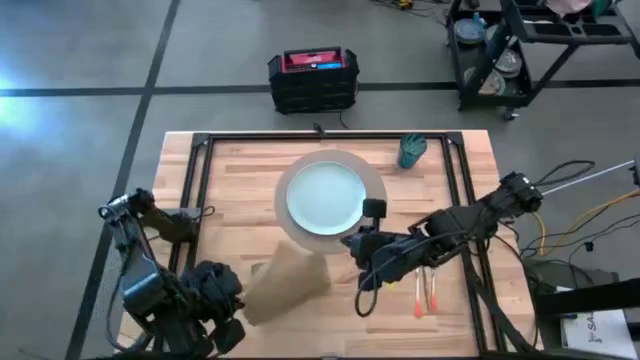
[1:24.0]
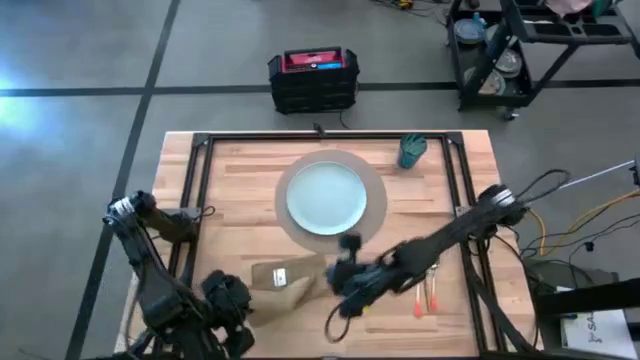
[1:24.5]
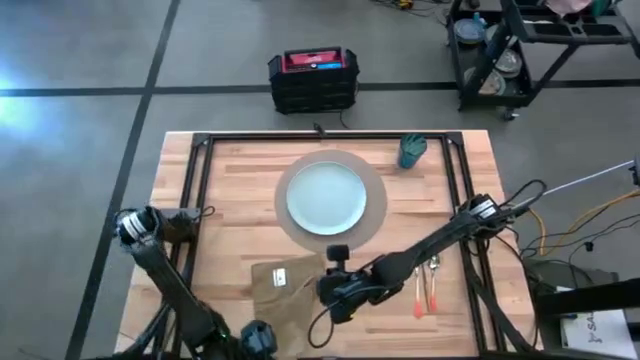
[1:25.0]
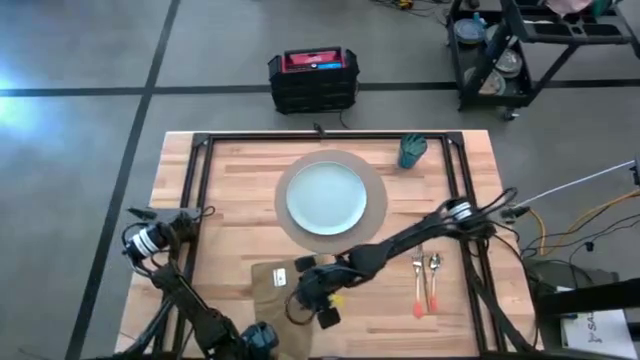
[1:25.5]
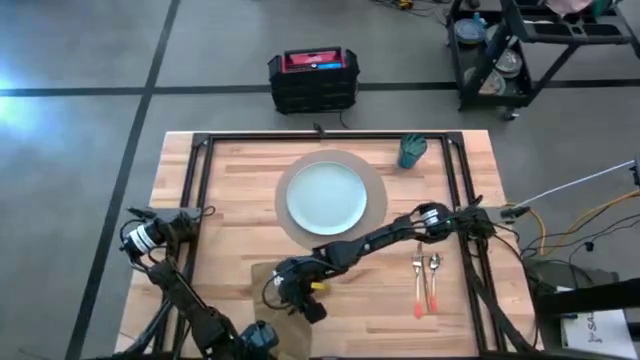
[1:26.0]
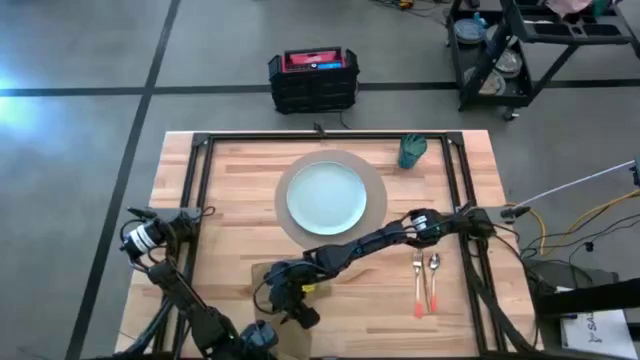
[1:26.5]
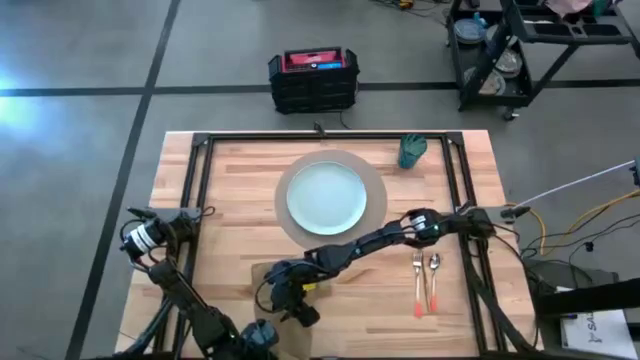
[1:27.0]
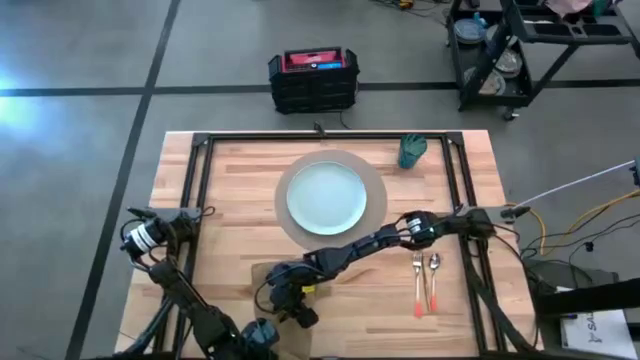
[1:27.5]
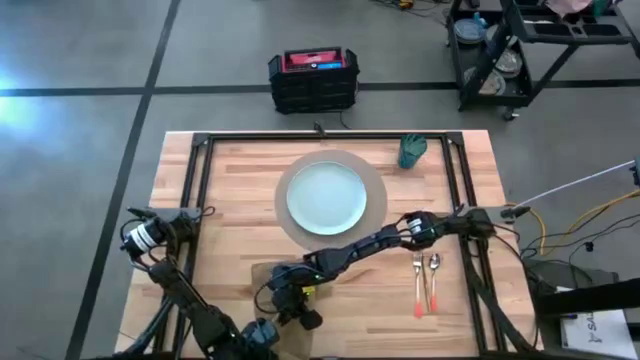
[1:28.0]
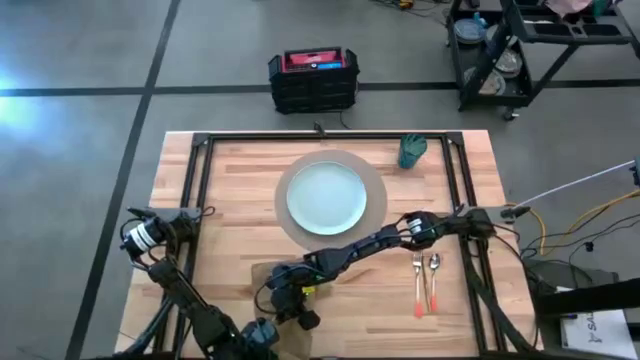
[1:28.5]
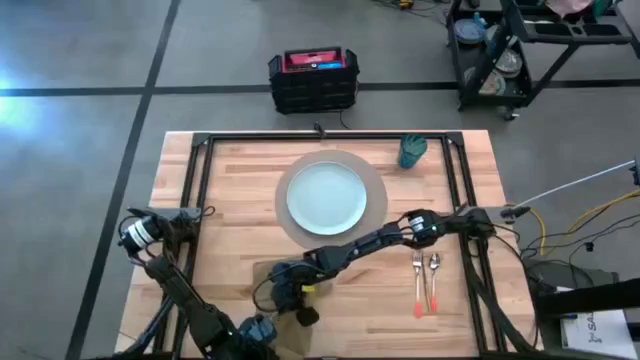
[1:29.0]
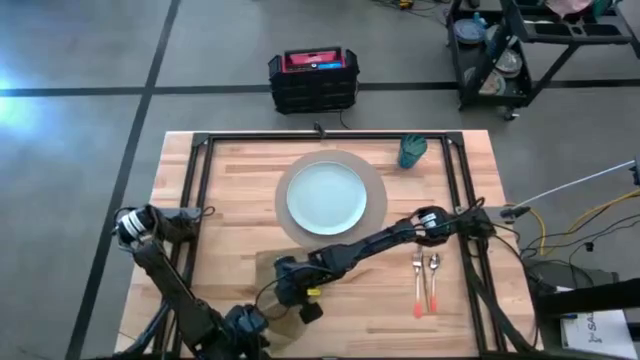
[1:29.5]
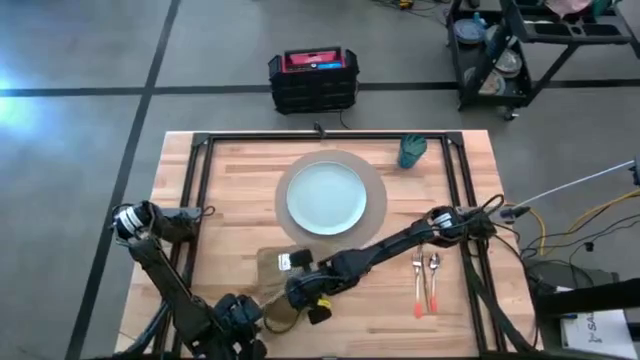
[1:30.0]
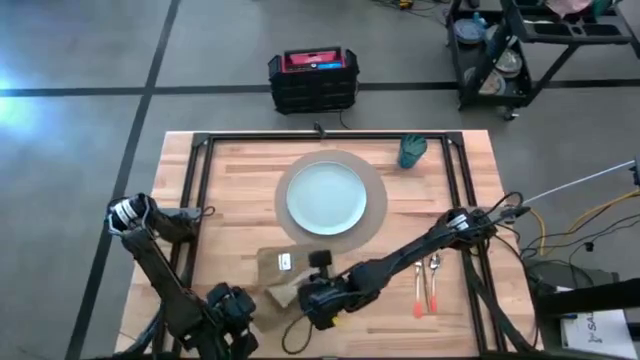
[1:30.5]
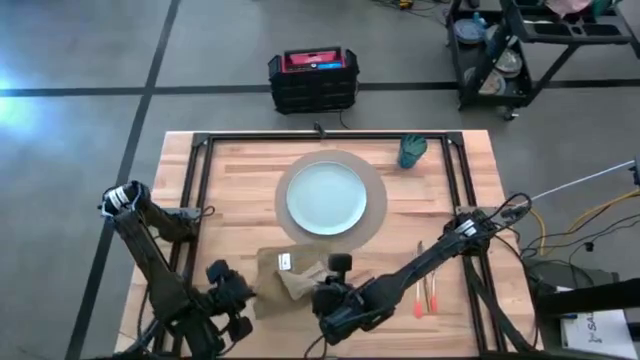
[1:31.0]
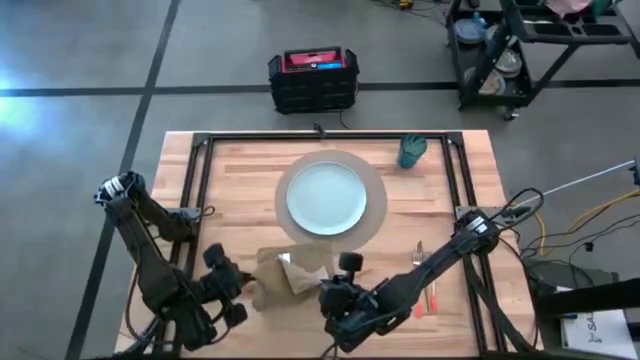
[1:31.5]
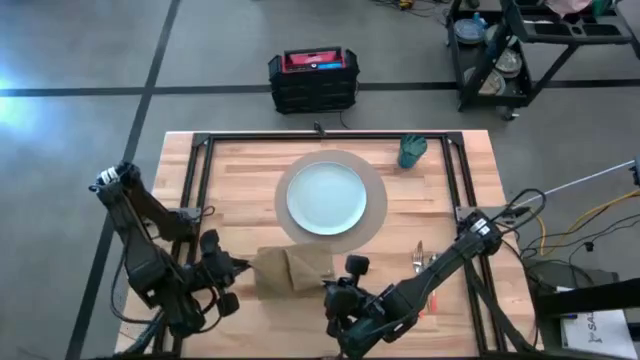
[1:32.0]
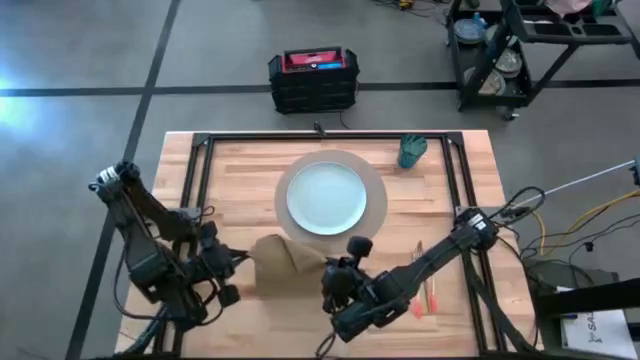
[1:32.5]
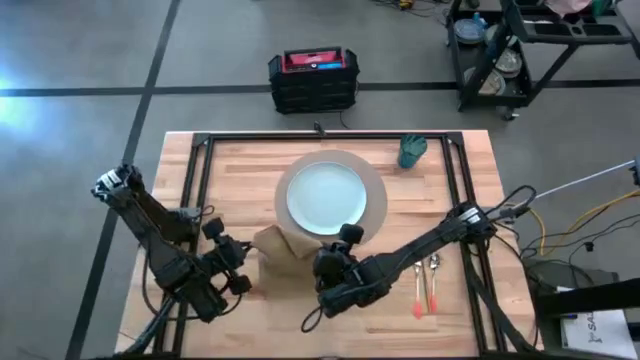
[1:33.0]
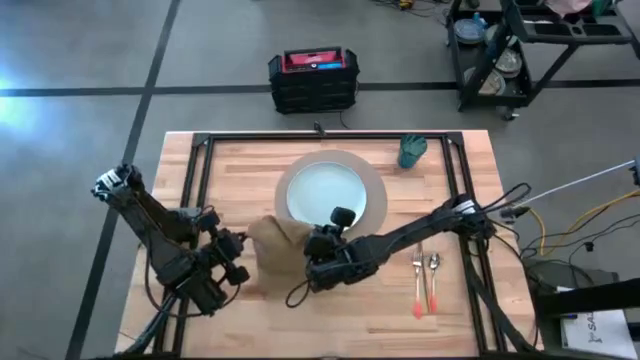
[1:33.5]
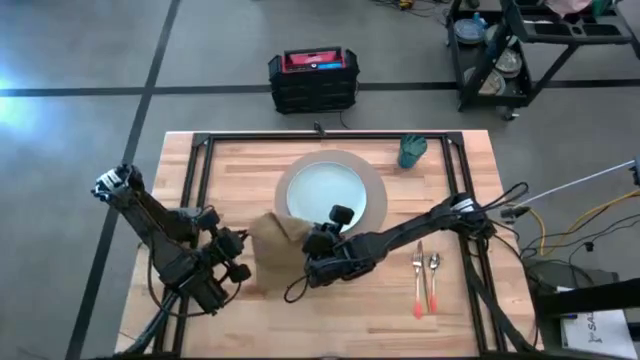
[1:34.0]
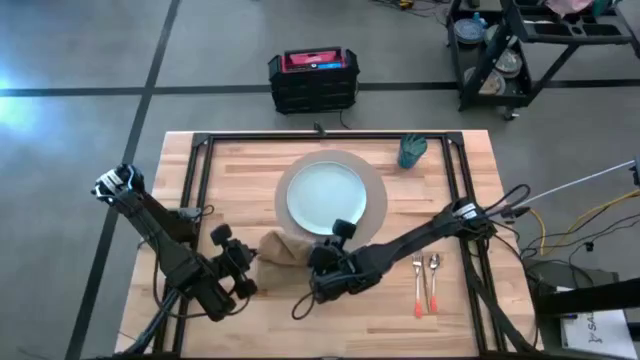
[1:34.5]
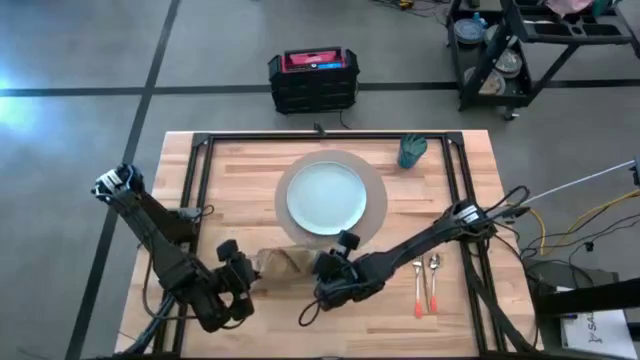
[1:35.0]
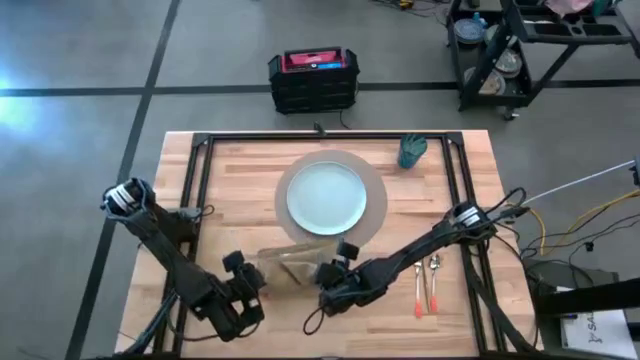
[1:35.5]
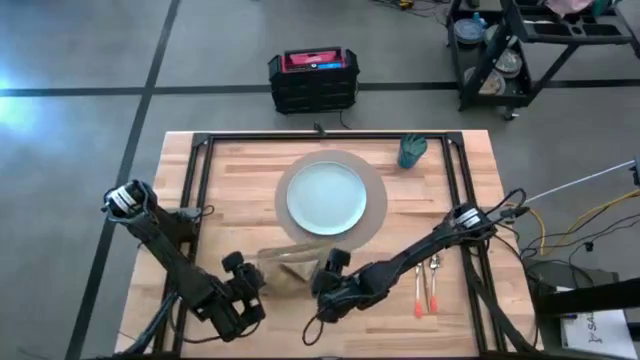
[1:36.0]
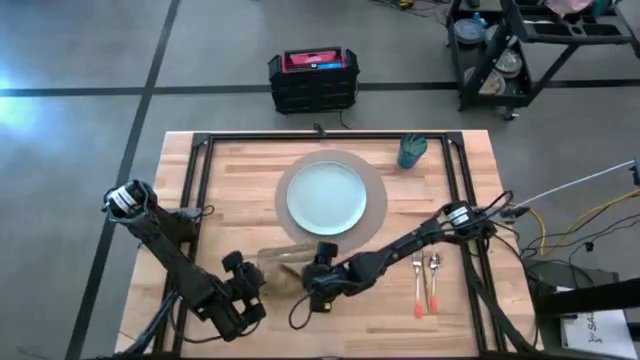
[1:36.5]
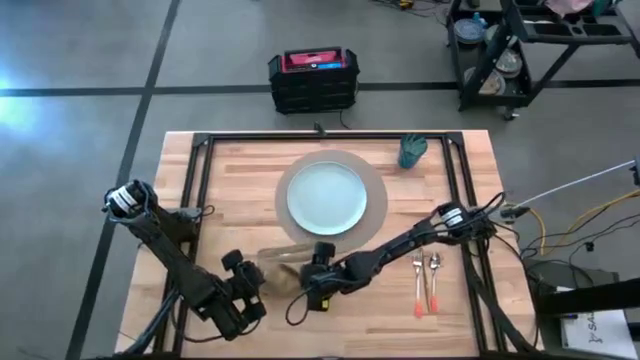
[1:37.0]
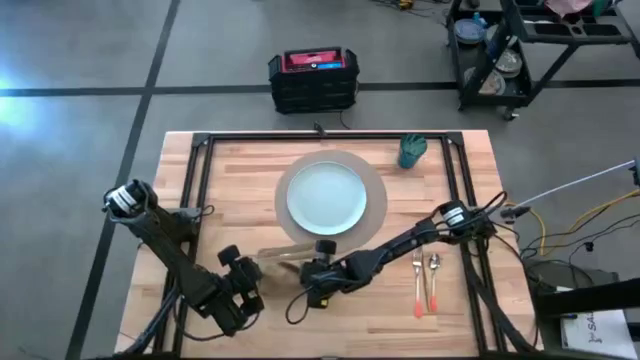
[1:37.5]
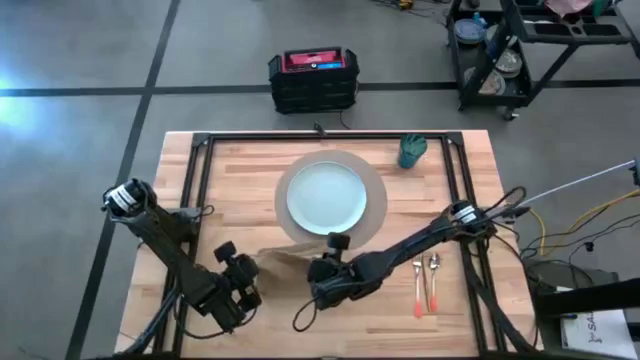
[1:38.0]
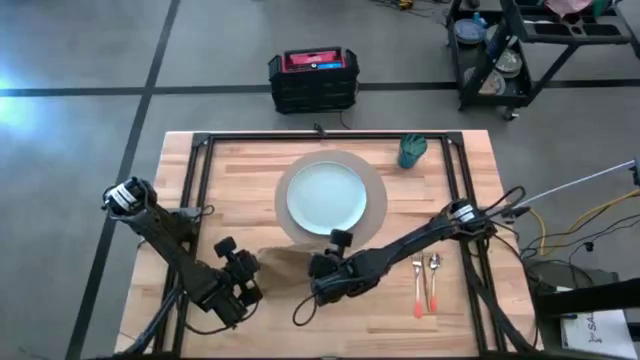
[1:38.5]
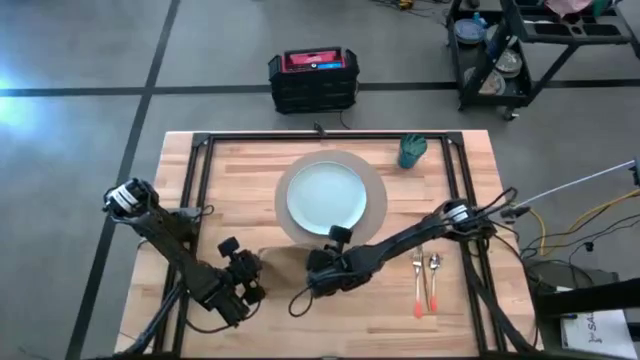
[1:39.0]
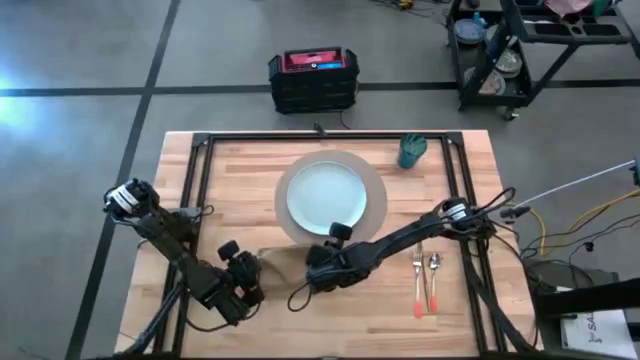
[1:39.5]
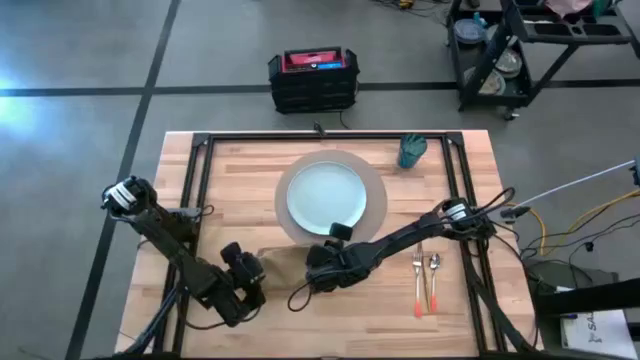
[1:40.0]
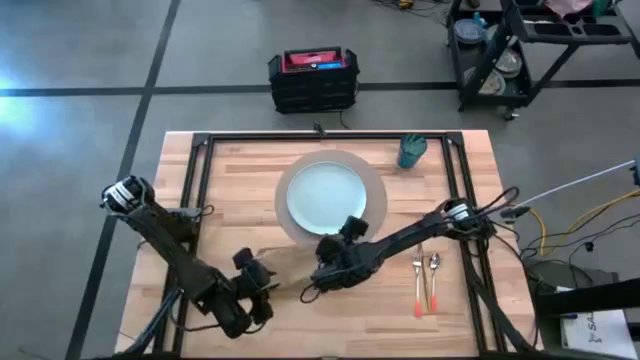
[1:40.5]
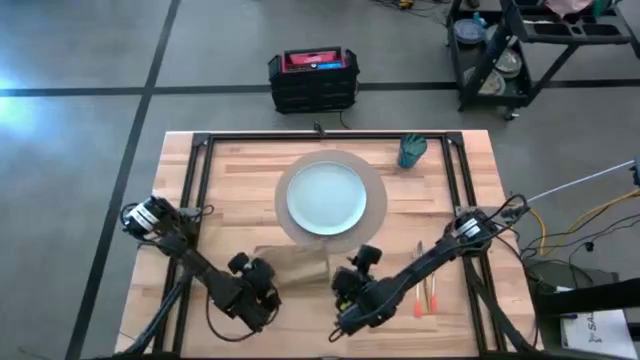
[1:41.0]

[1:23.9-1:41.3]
Task: Set table place
Fold the brown table napkin

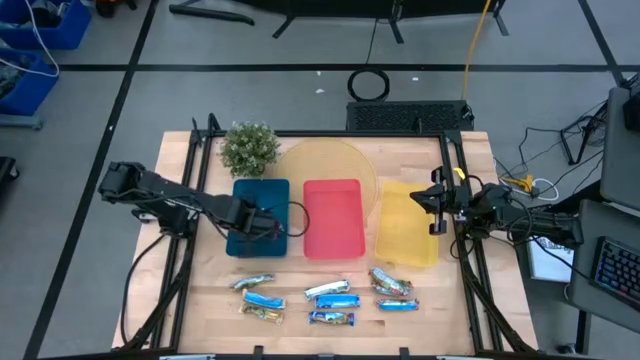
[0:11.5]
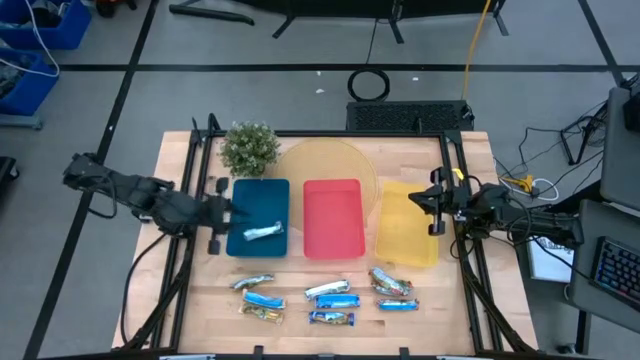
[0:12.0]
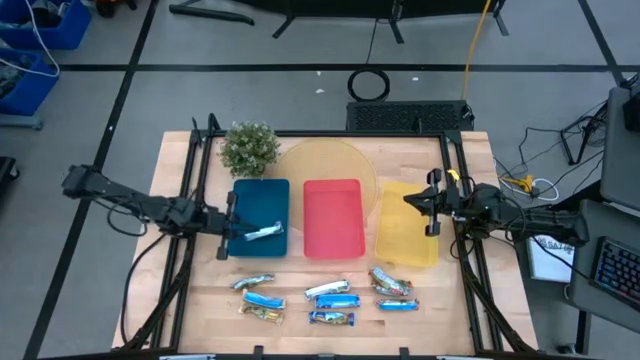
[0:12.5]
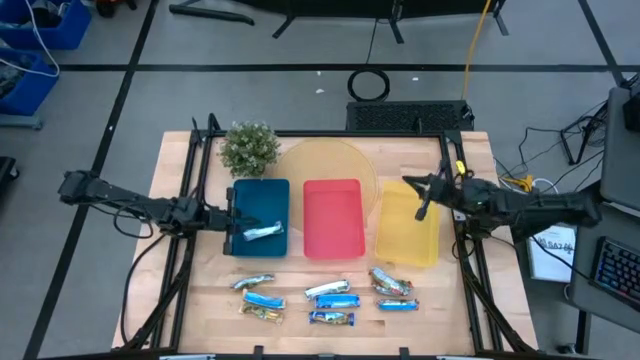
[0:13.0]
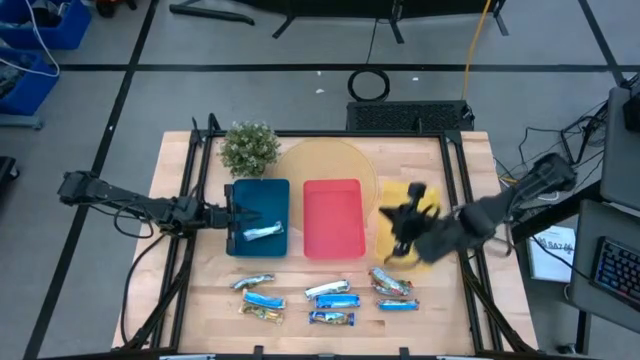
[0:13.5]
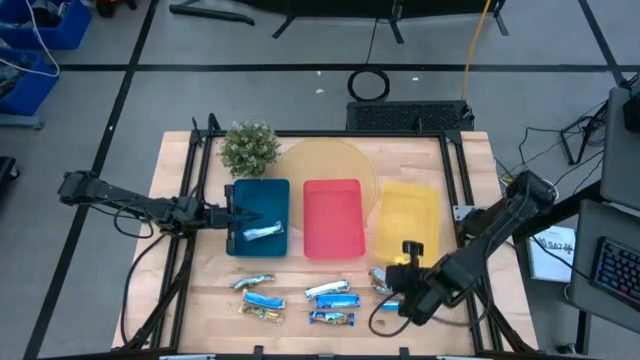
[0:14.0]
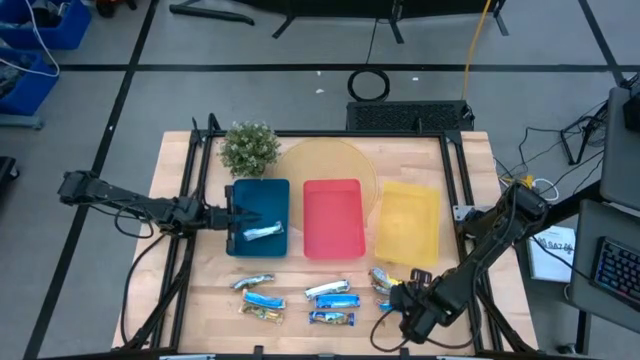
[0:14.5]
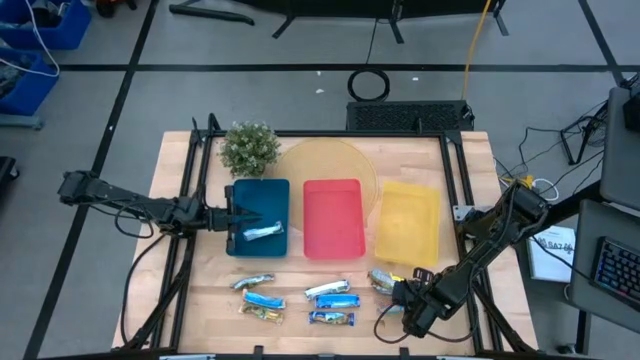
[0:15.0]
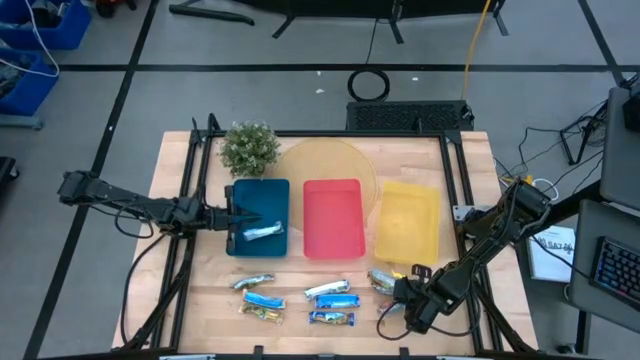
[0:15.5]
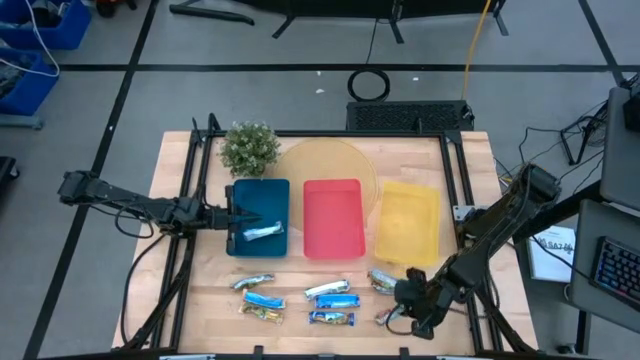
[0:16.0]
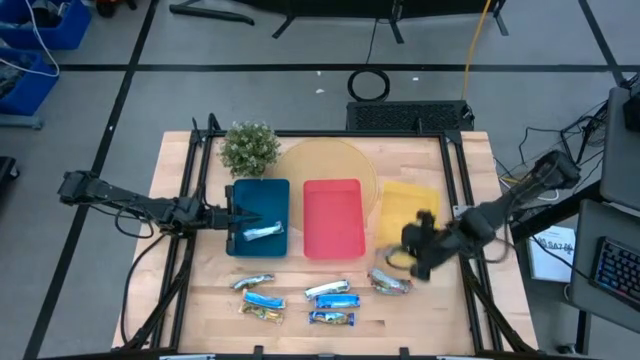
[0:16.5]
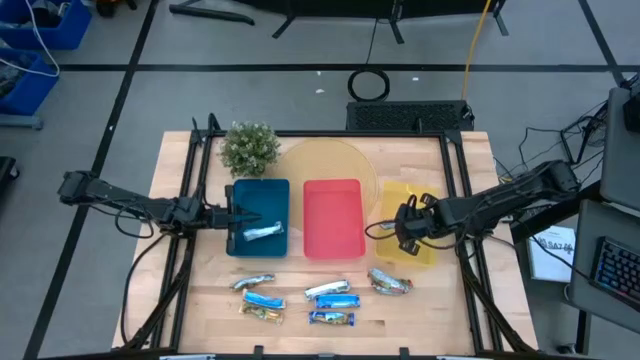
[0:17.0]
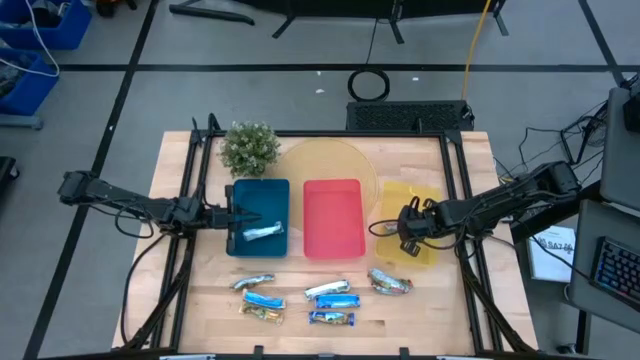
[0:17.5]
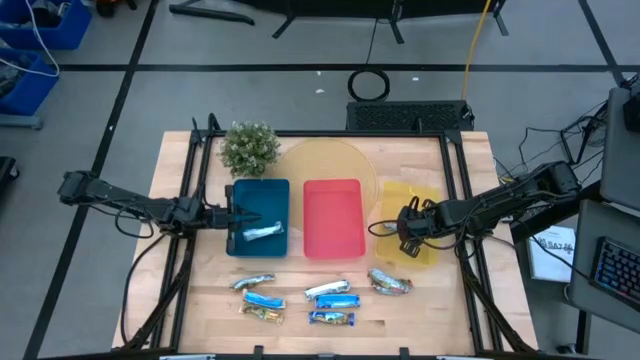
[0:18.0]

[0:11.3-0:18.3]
Task: Pick and place Granola Bars by type
Put the red granola bar into the yellow bin
